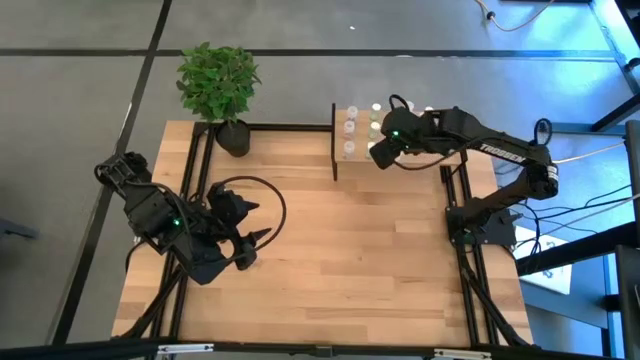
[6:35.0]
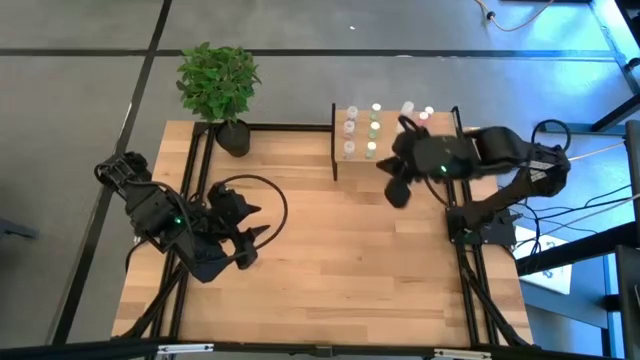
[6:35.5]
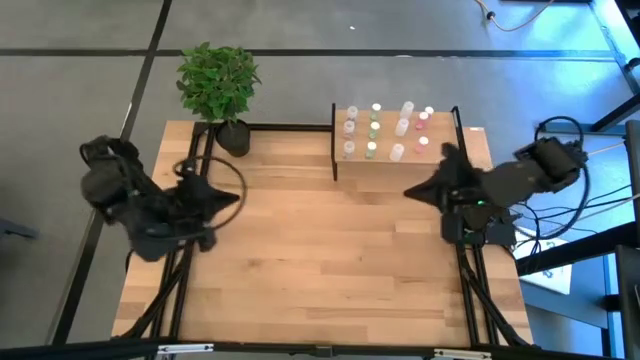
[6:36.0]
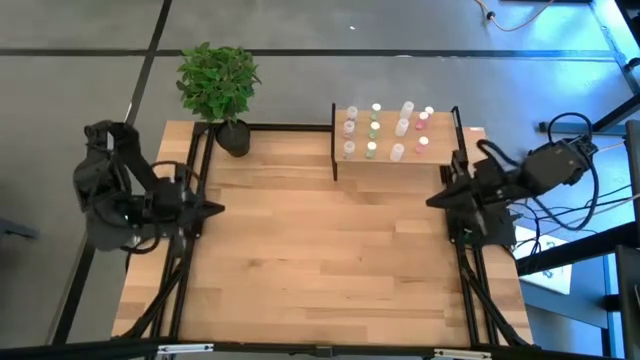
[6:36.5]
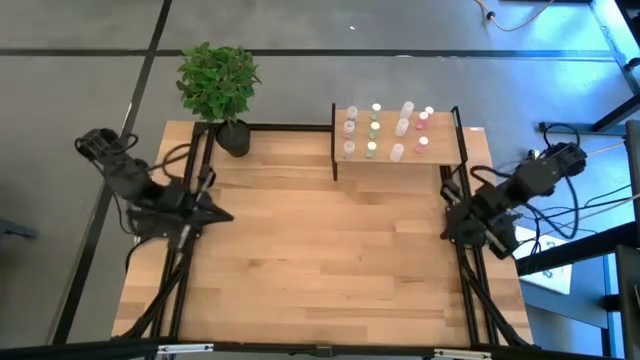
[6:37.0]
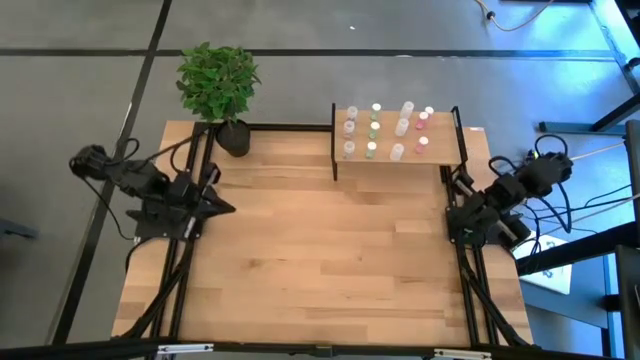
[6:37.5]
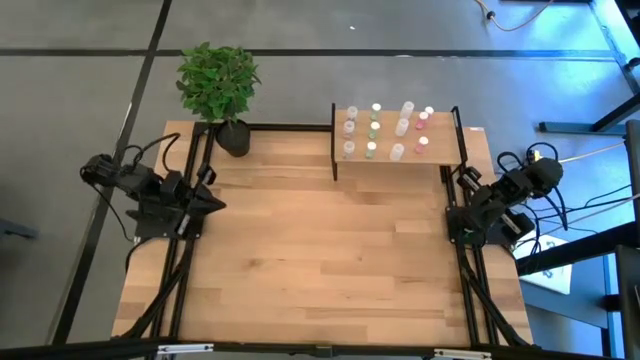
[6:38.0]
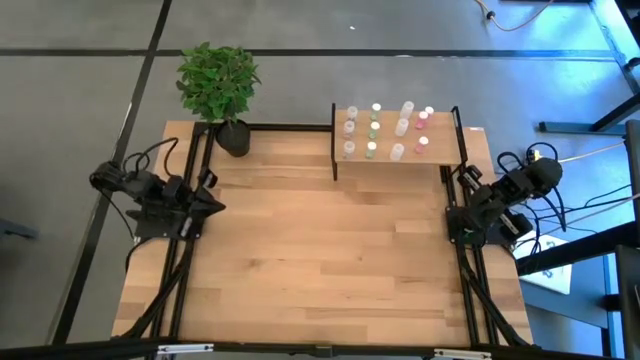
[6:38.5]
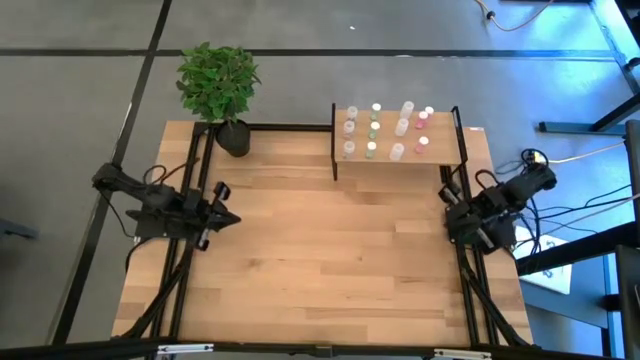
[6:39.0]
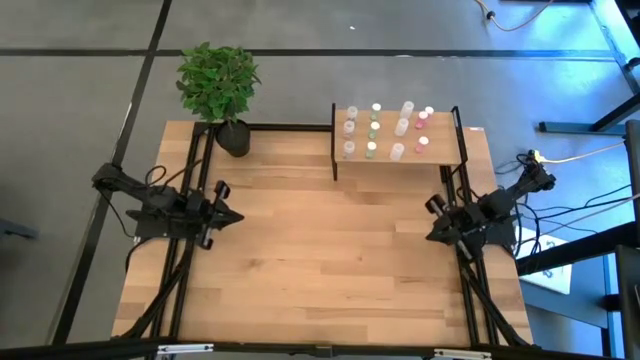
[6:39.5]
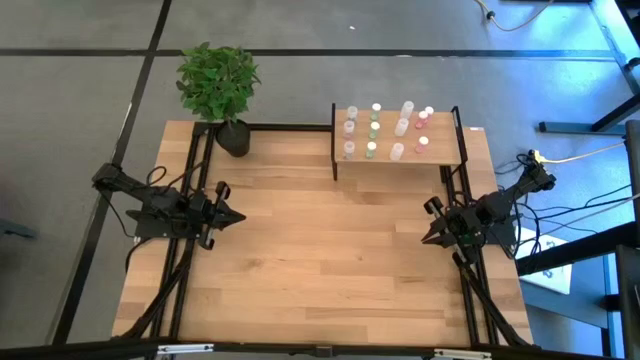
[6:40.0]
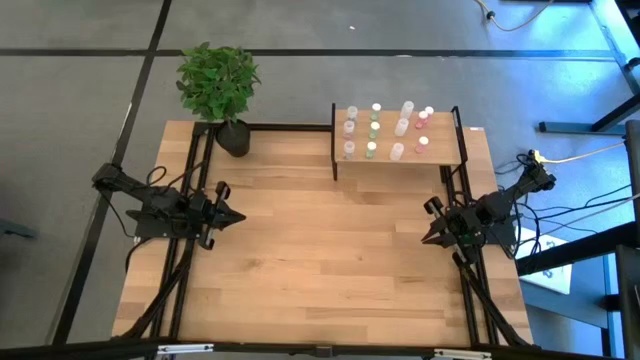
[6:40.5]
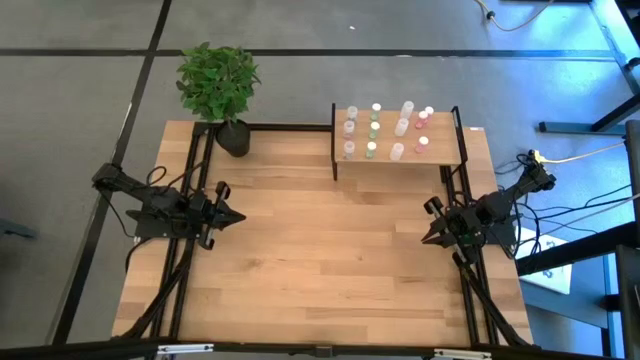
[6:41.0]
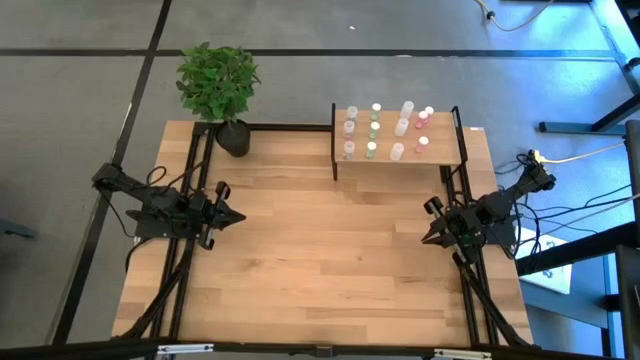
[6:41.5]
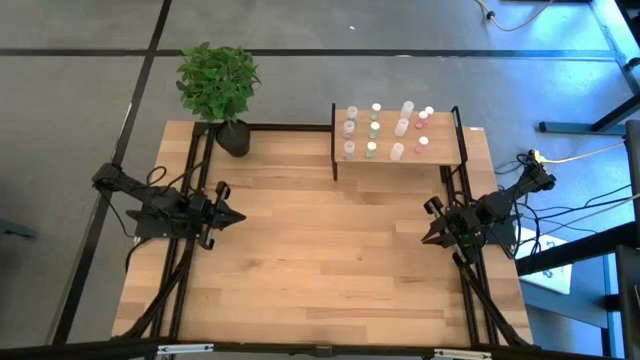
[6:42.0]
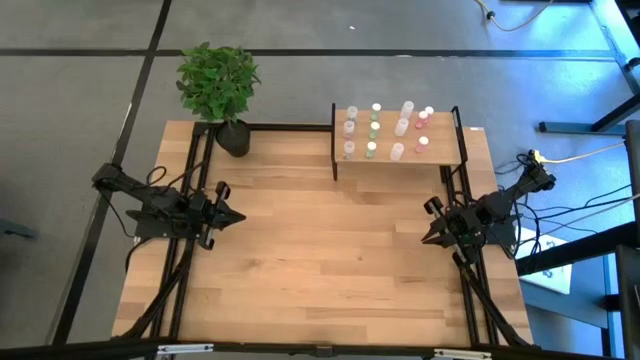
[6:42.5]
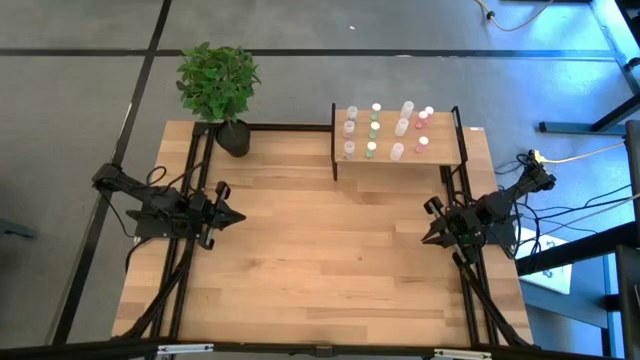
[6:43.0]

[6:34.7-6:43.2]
Task: Pick and place medicine bottles onto shelf by color
Return to Home Position
